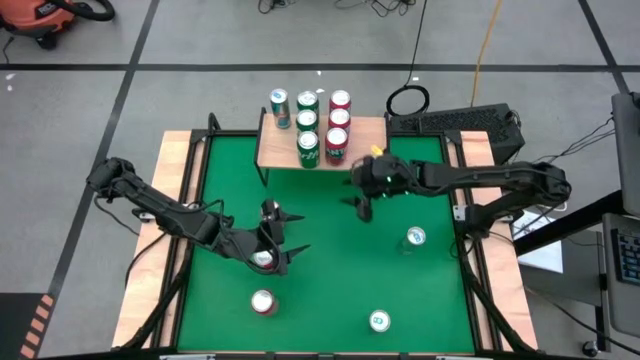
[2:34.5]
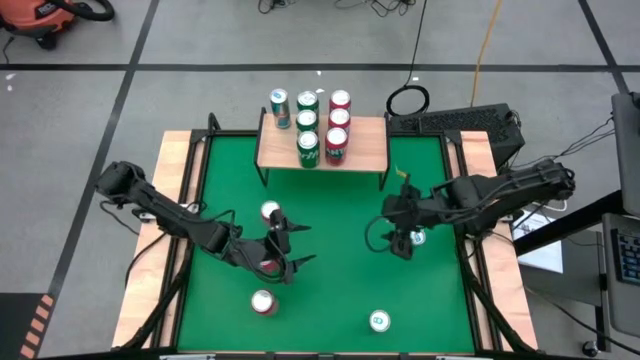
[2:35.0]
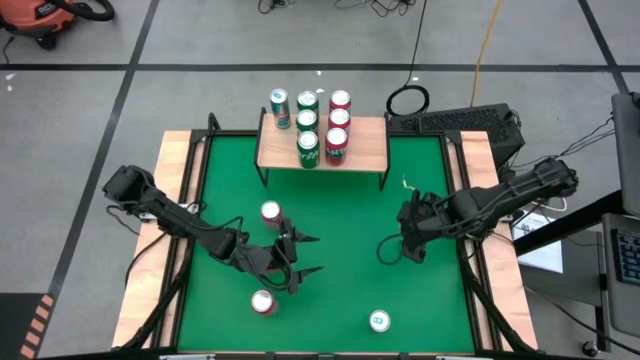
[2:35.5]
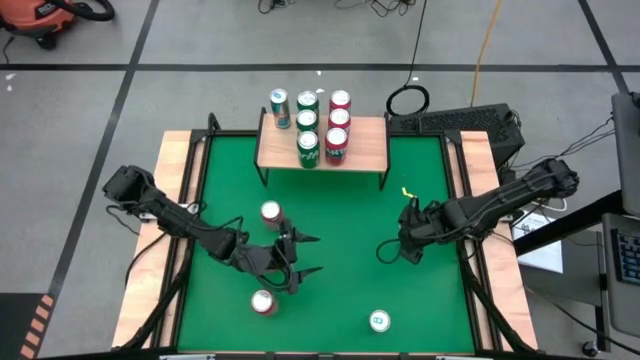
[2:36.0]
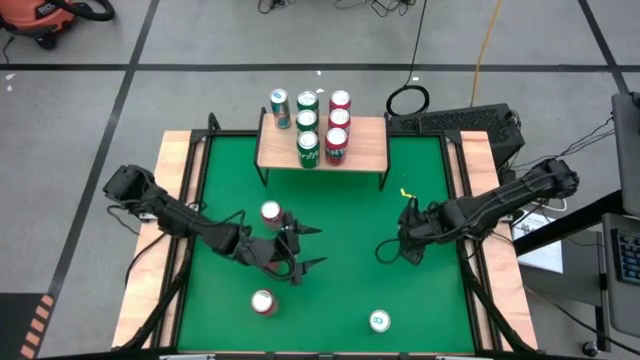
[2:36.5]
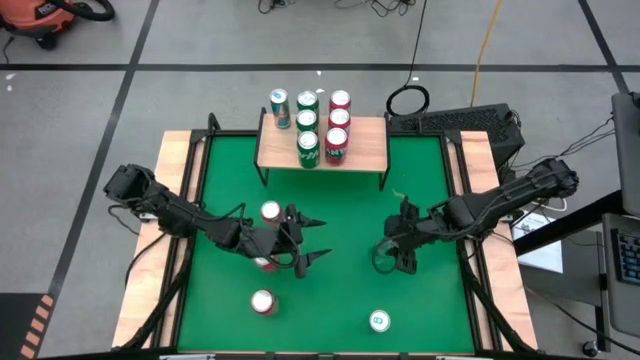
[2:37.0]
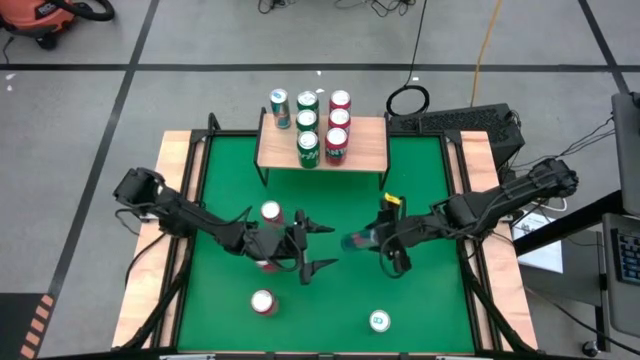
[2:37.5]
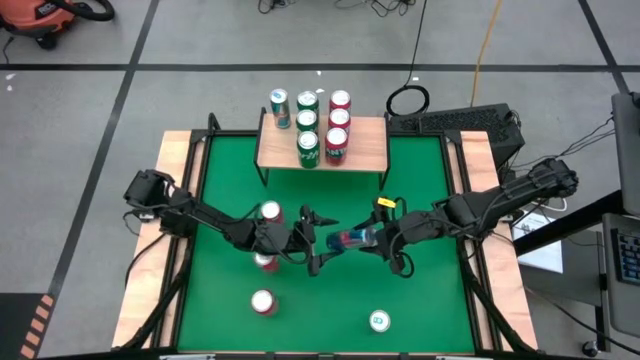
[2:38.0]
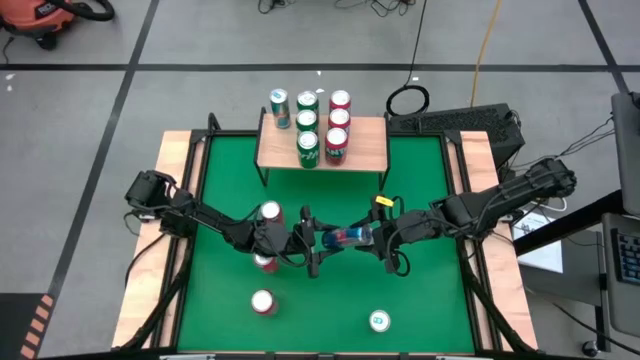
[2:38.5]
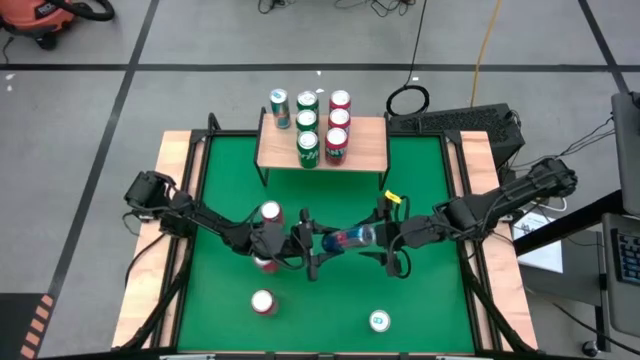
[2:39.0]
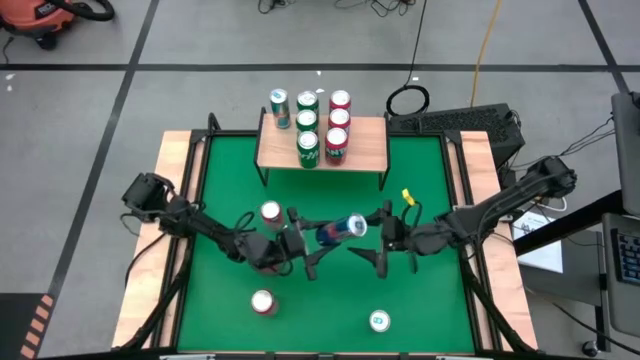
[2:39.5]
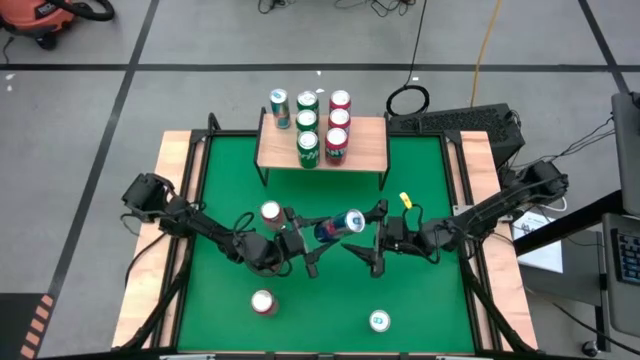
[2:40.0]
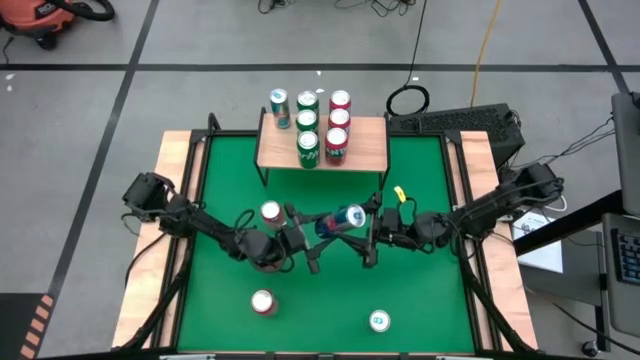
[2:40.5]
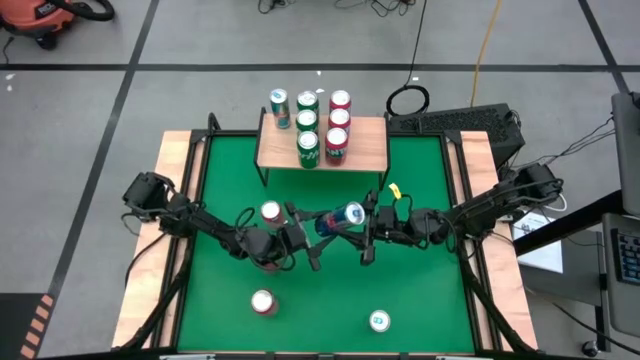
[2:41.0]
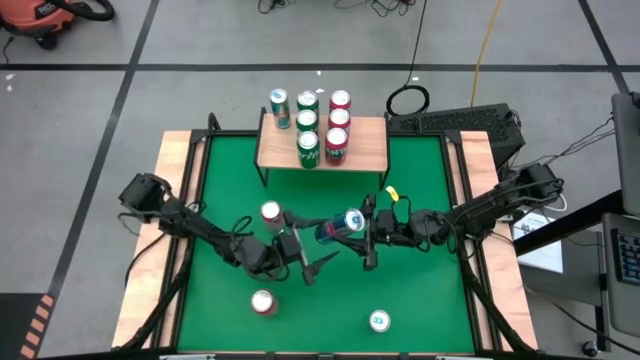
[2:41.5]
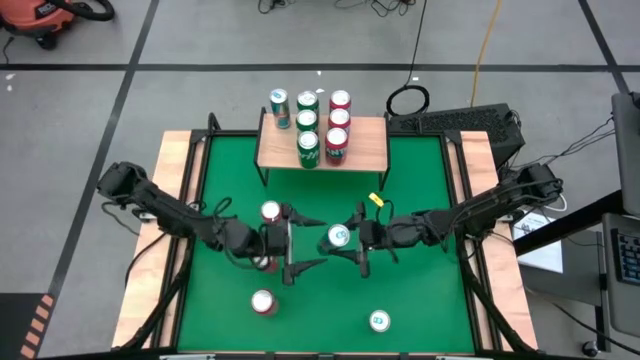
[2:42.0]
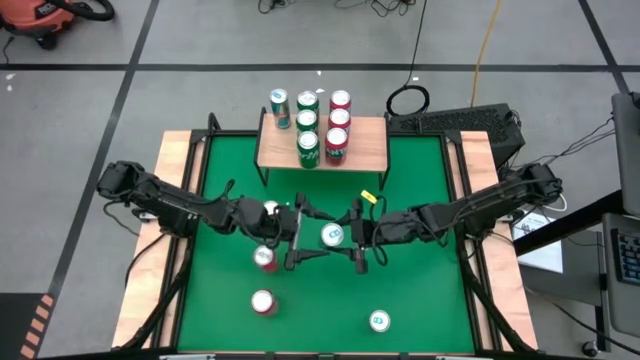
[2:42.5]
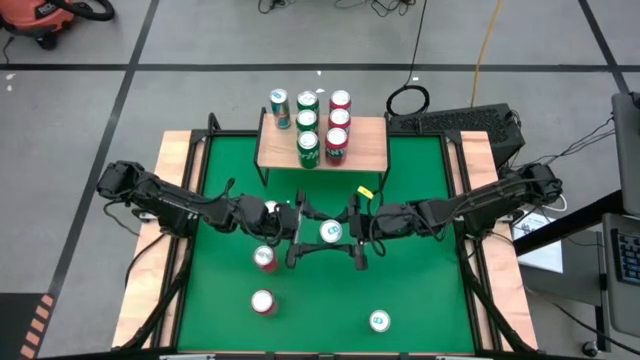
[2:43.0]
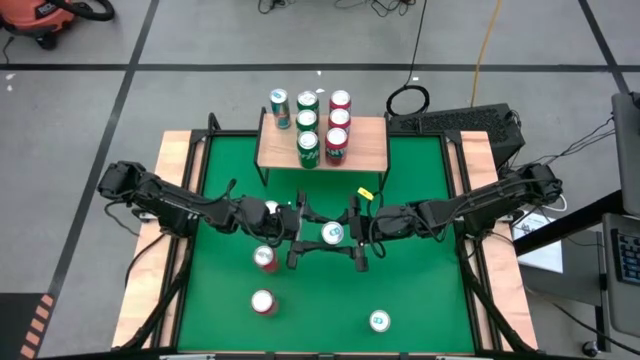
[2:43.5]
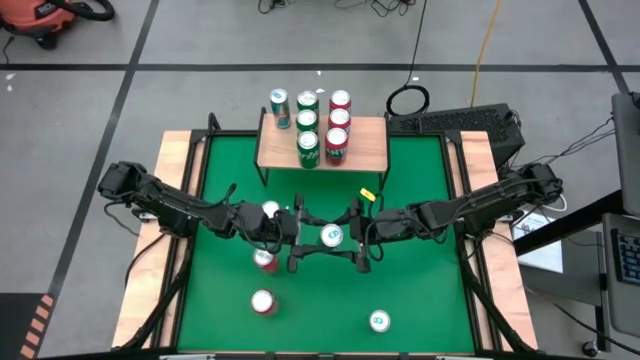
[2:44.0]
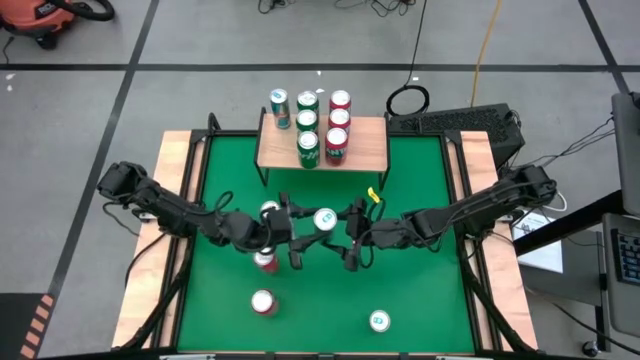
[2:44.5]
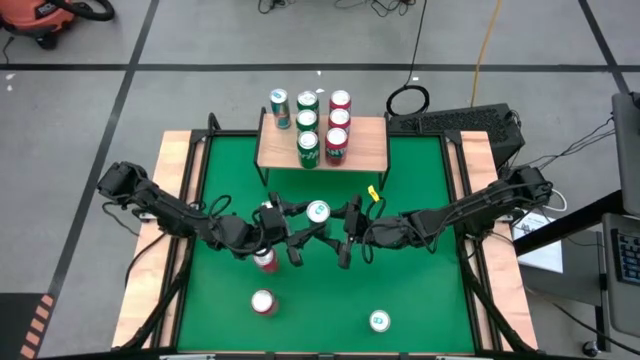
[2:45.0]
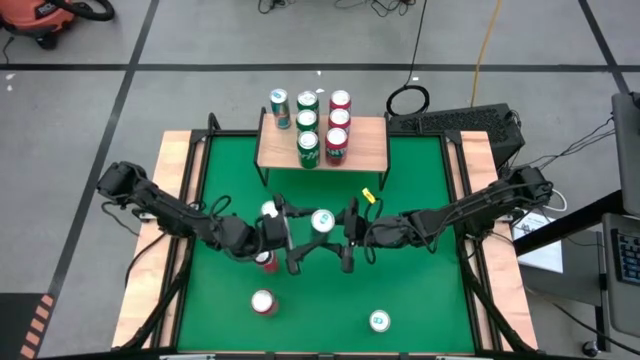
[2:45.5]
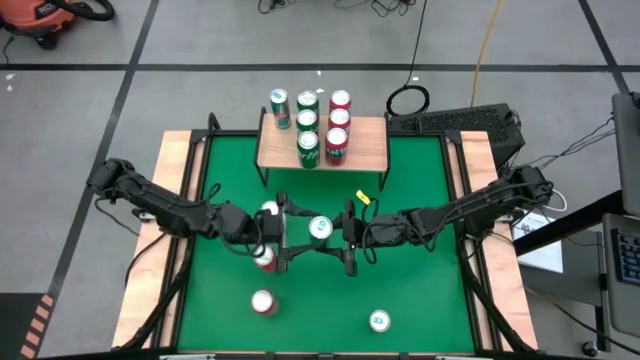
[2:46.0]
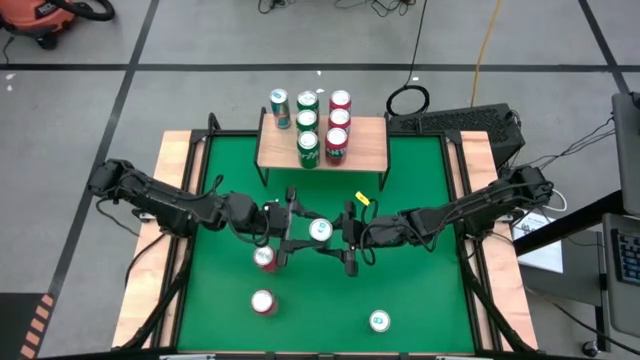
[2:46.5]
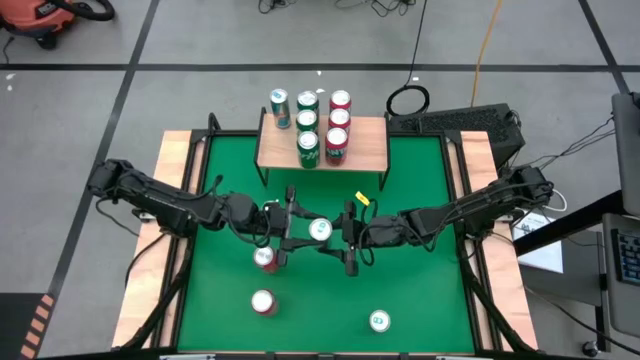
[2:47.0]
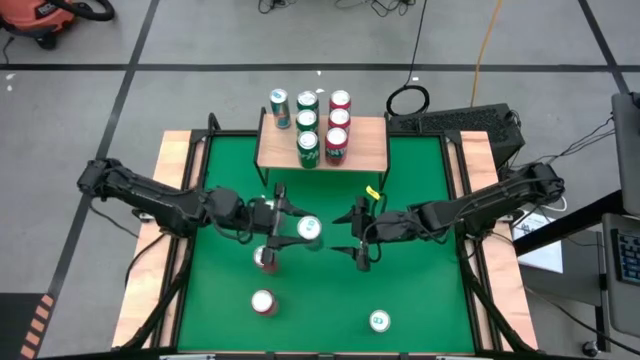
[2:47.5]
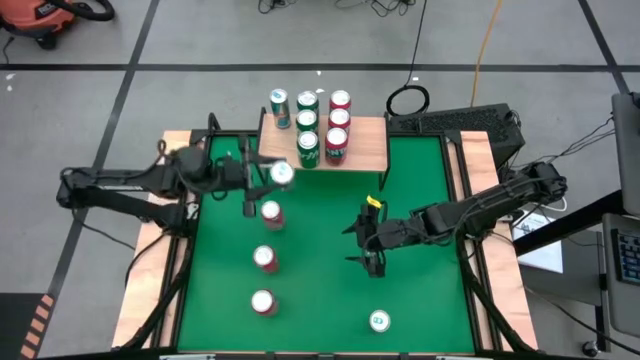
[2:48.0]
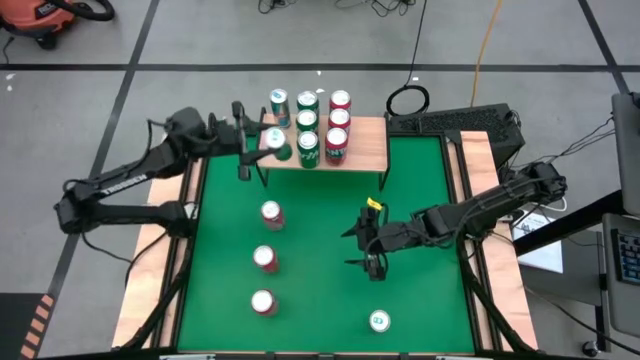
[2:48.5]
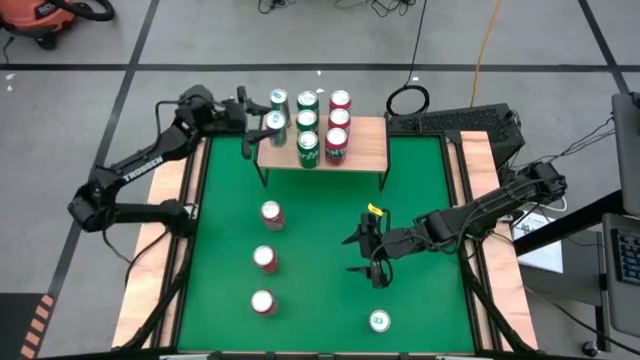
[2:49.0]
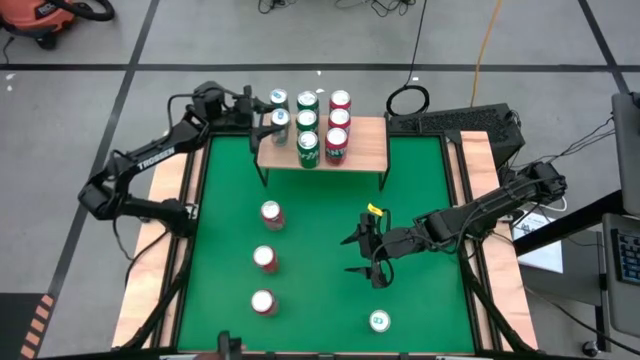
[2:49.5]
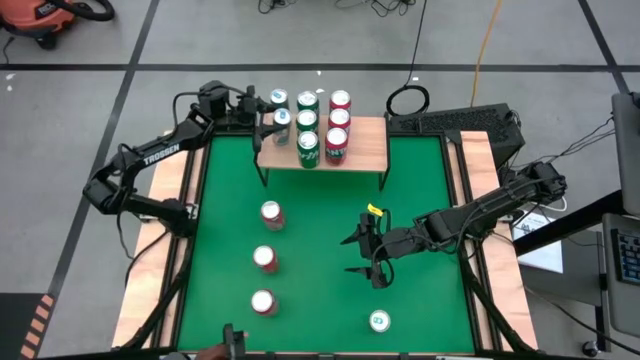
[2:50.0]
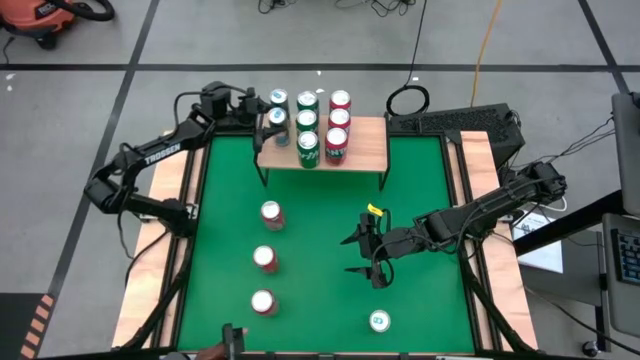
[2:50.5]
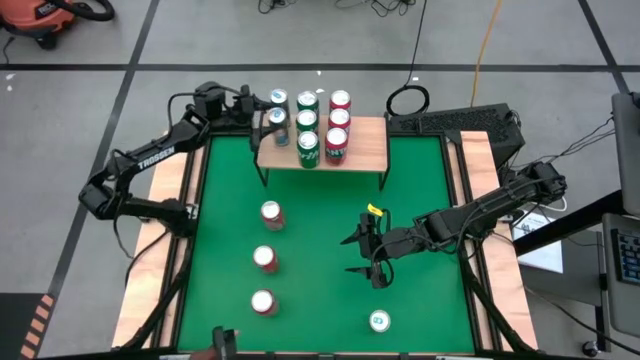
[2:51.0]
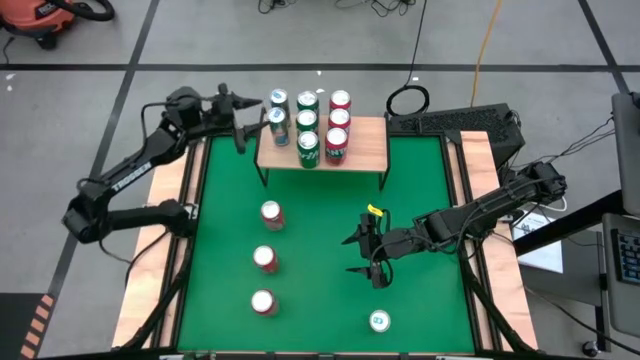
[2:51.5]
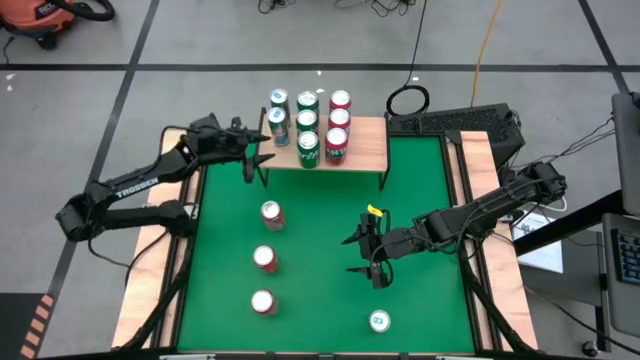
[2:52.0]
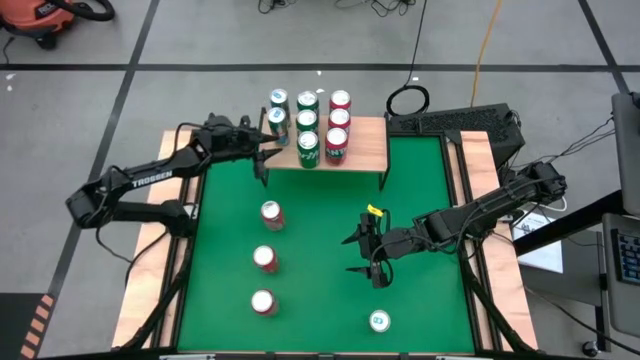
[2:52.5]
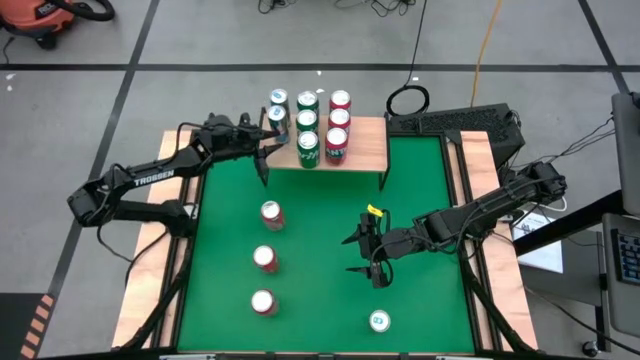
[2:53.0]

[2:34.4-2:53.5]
Task: Place canned beverage on shelf
Put the blue soda can on the shelf aligned with the other blue soda can

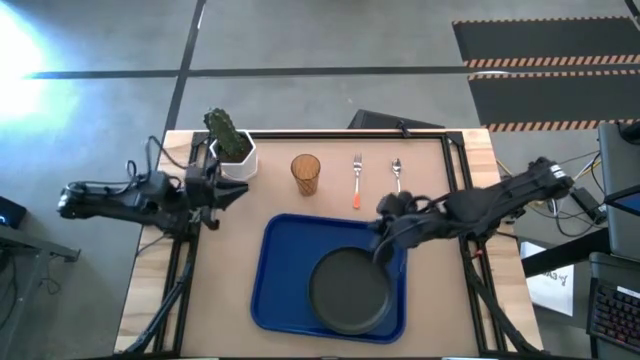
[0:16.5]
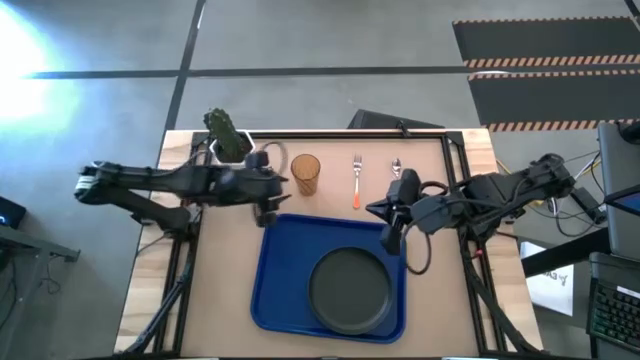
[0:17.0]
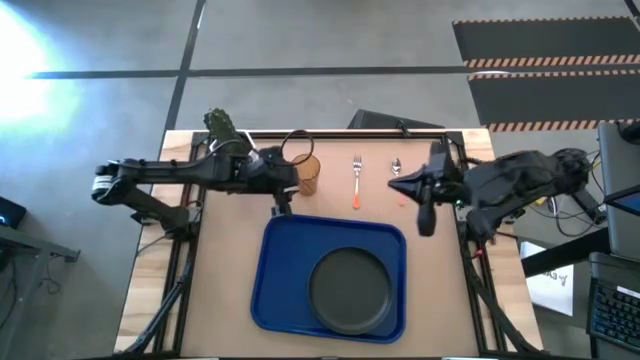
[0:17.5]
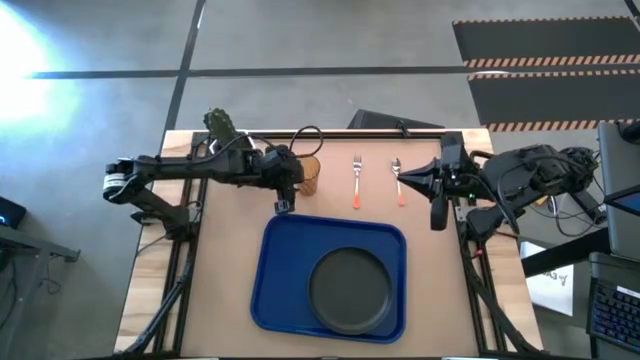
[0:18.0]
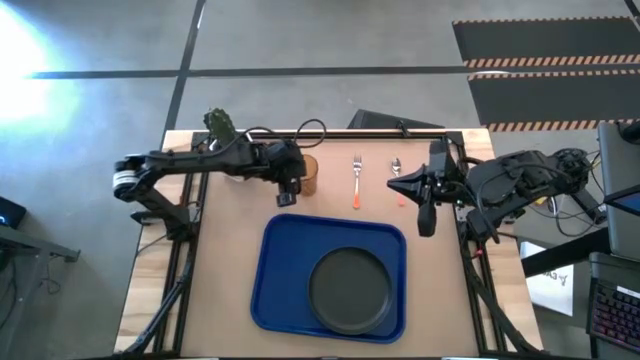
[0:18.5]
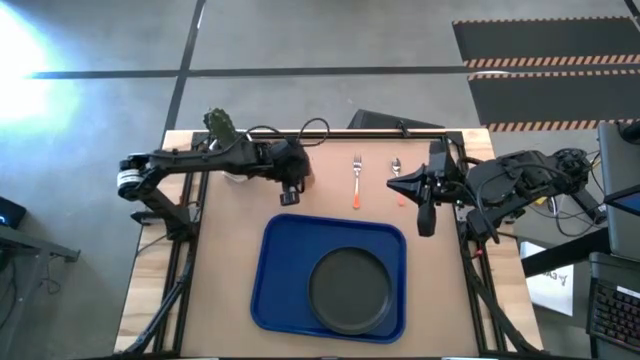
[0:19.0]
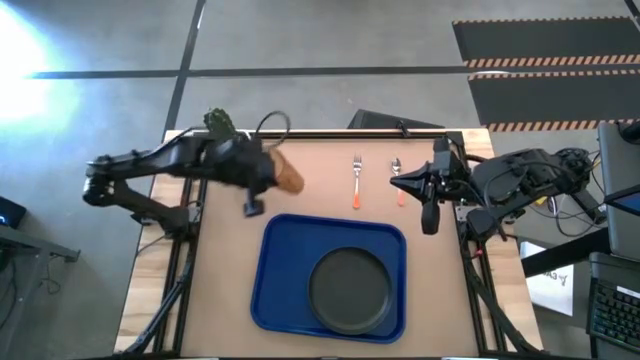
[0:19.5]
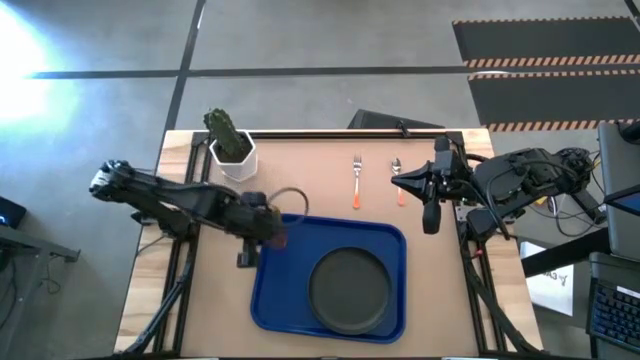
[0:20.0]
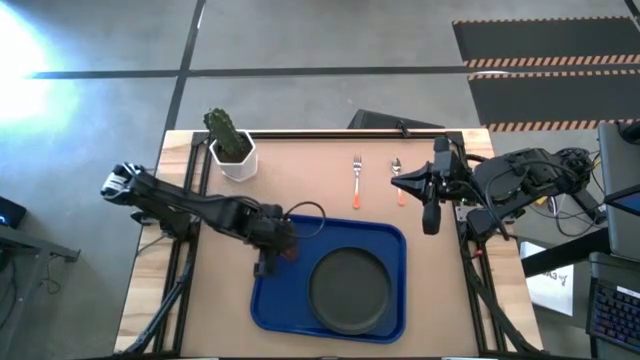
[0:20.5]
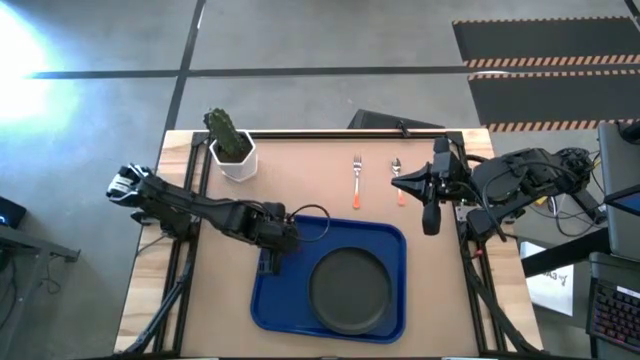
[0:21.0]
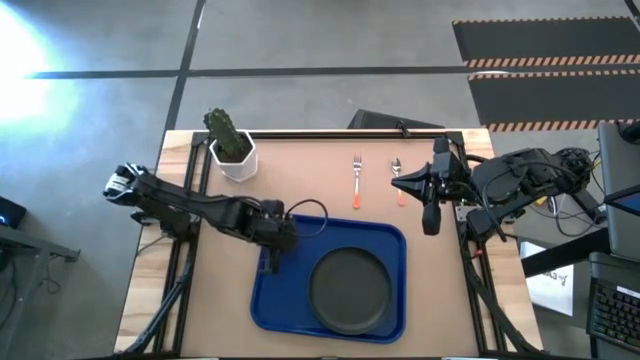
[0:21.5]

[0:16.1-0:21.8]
Task: Pick and place plate/cup/fork/spoon on tray
Put the brown cup on the blue serving tray to the left side of the black plate
